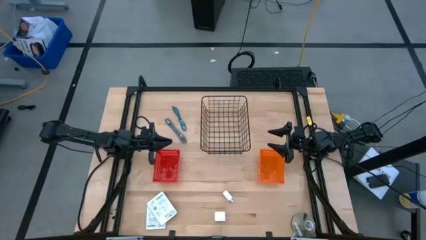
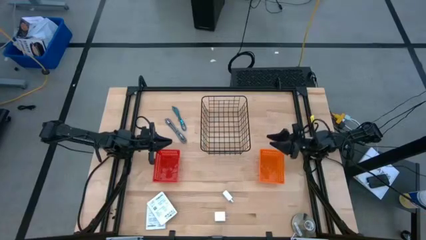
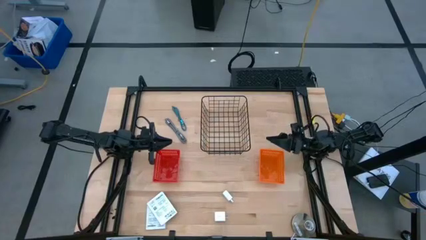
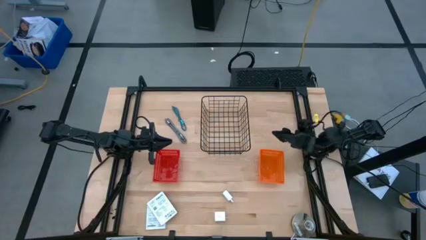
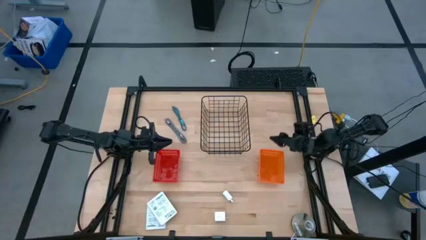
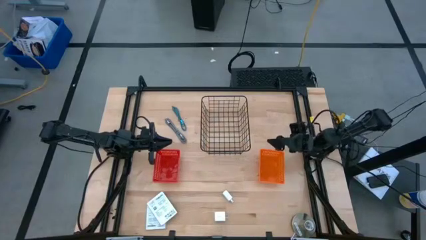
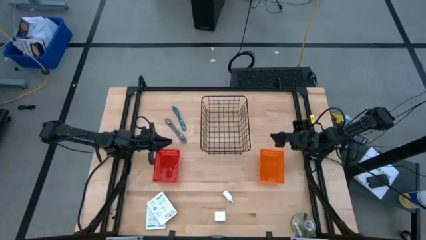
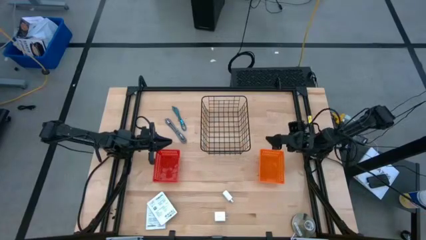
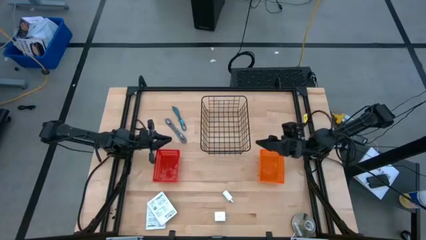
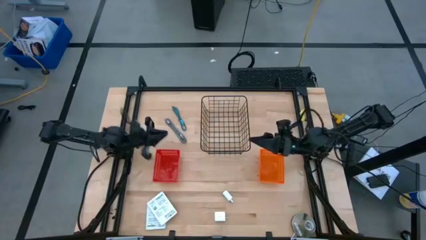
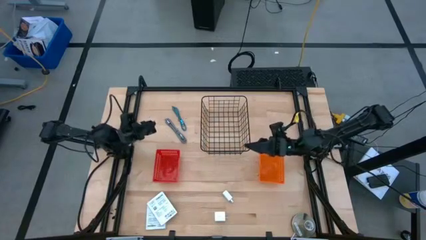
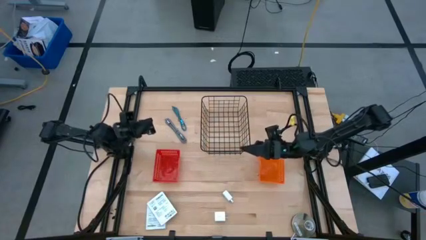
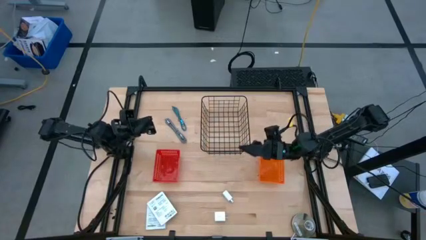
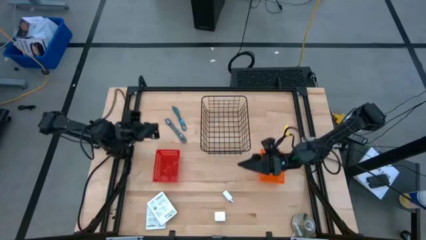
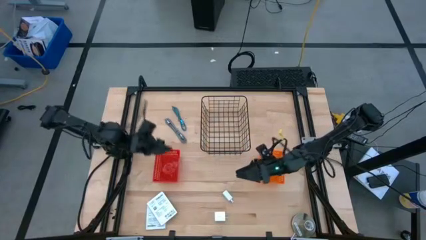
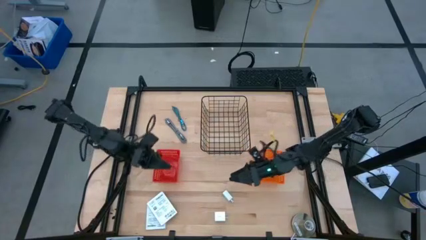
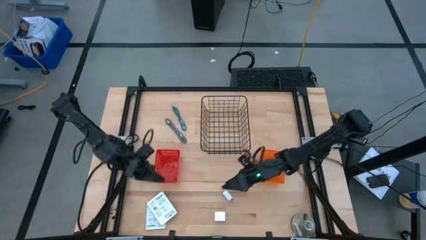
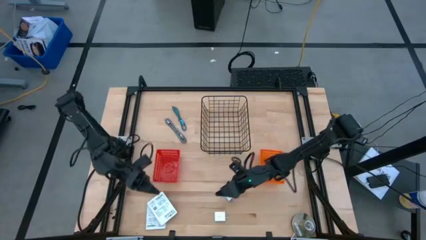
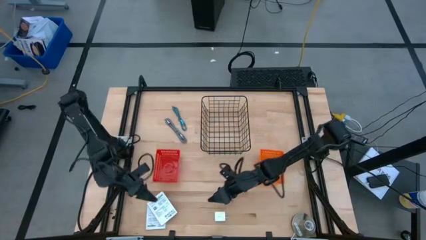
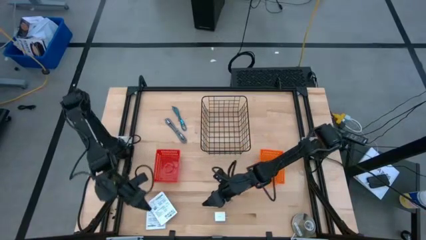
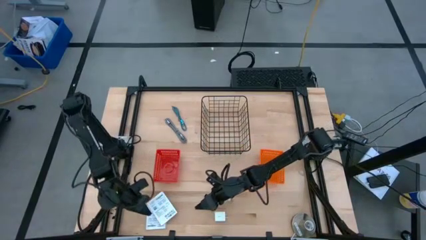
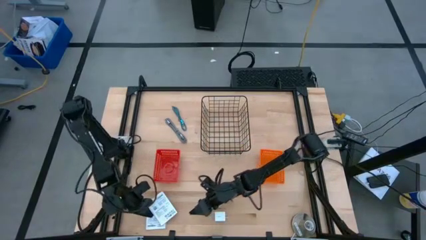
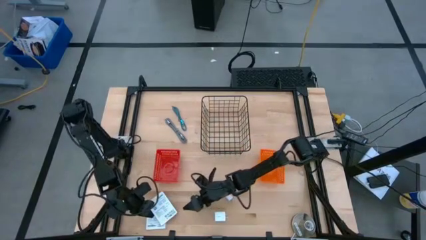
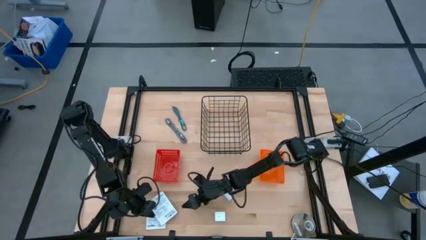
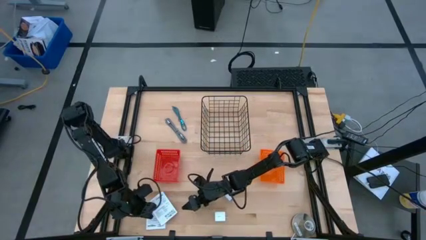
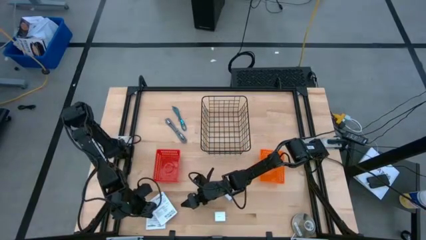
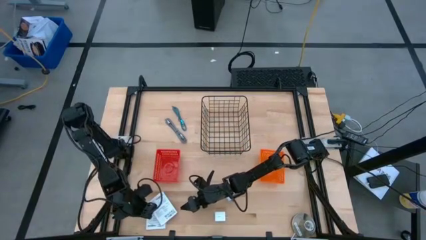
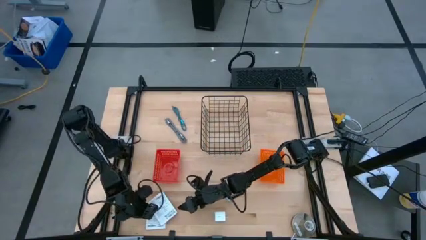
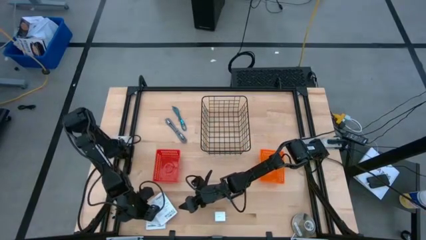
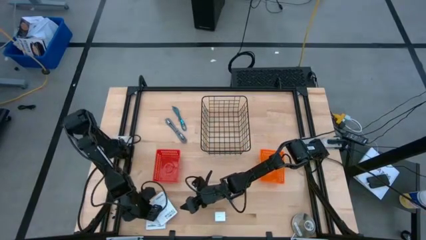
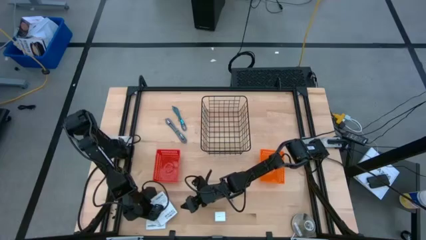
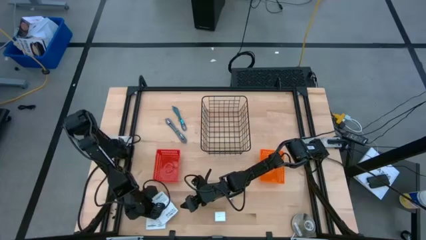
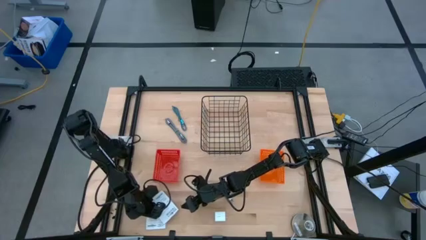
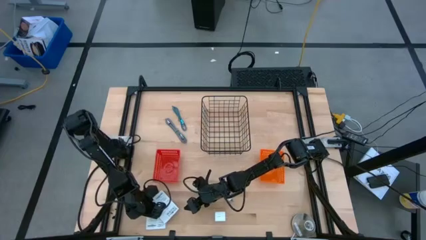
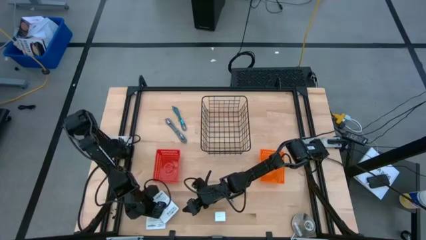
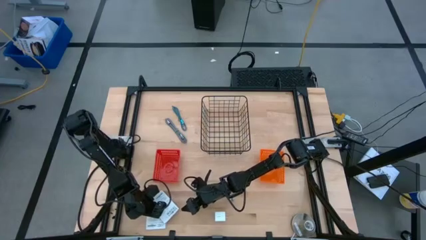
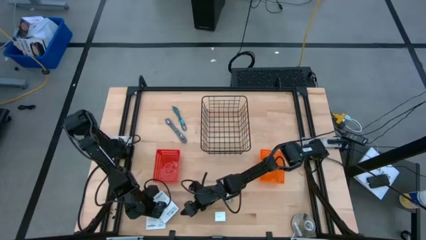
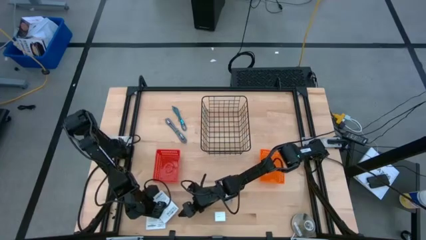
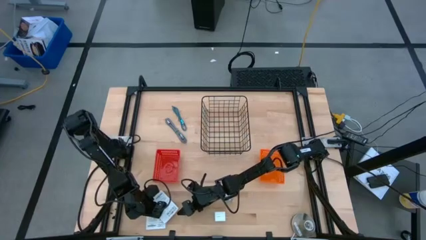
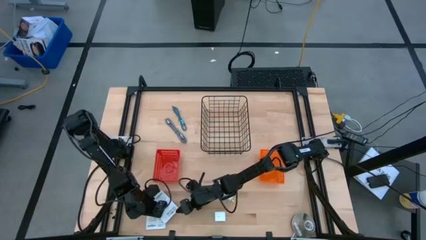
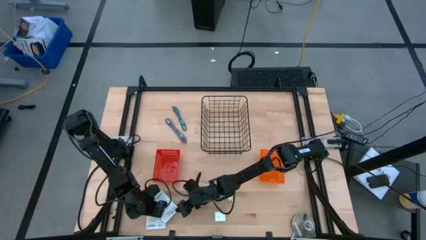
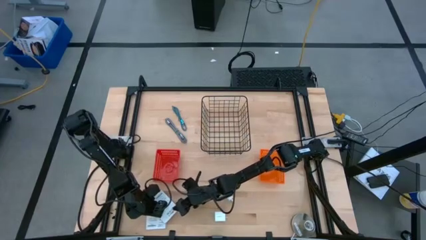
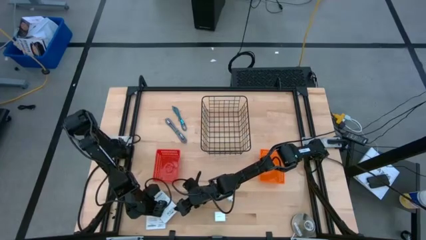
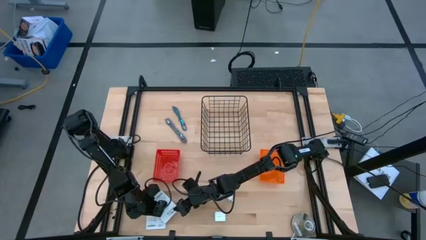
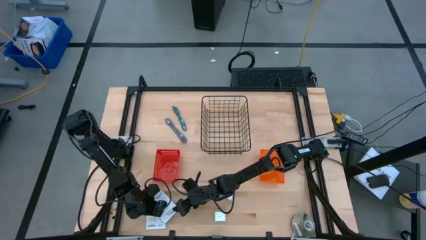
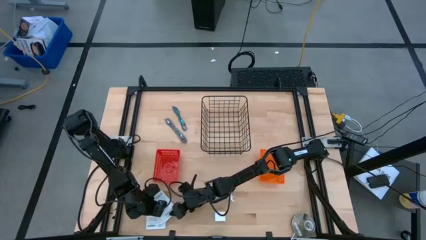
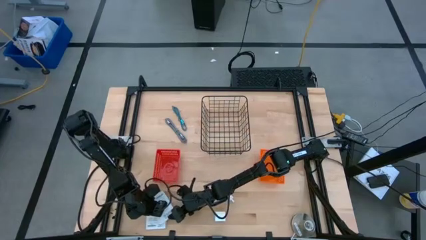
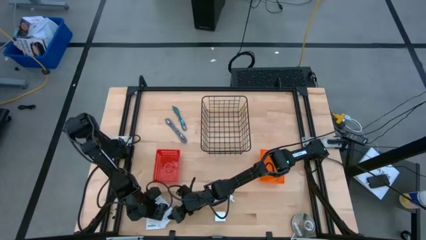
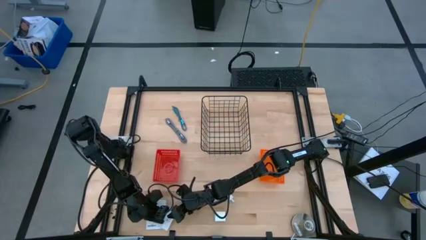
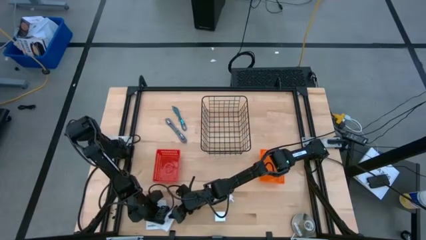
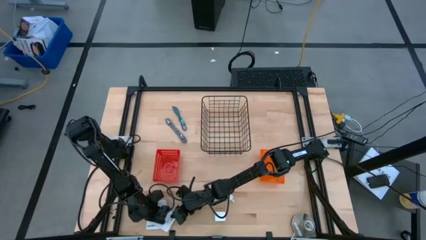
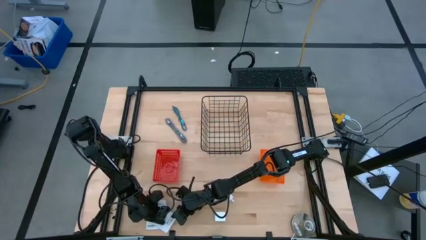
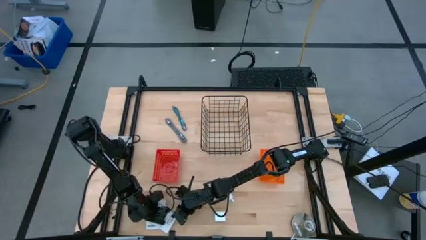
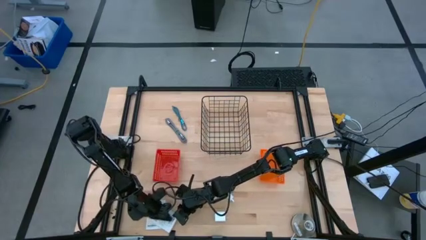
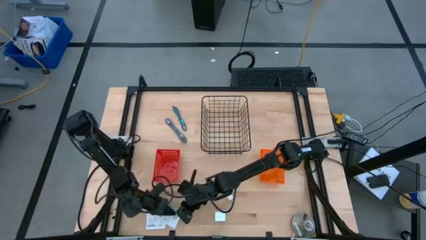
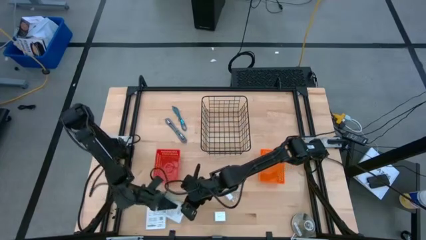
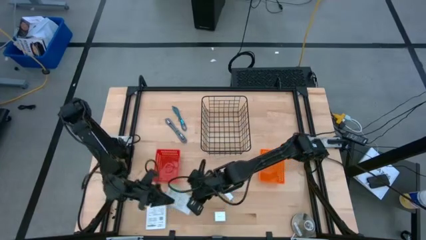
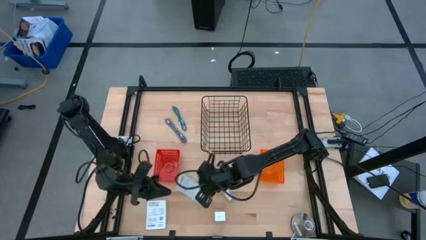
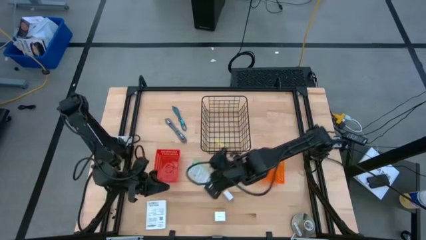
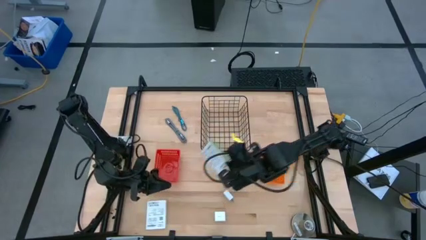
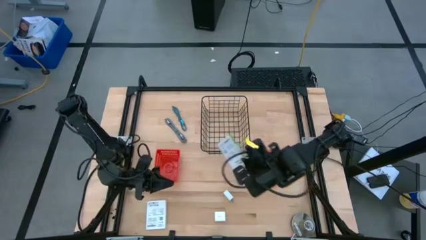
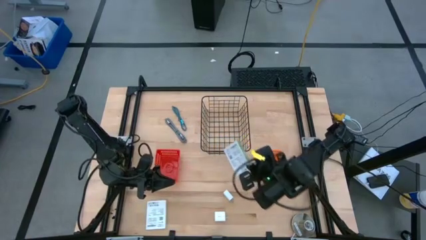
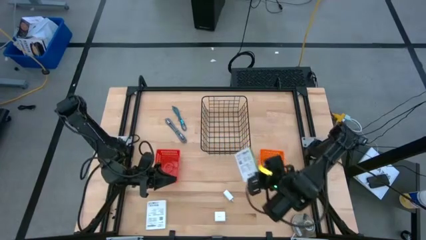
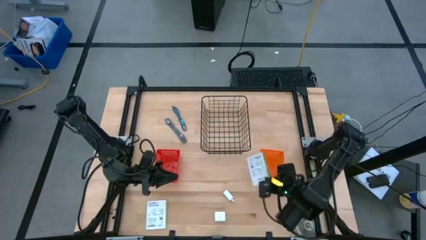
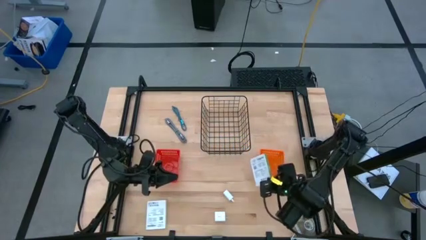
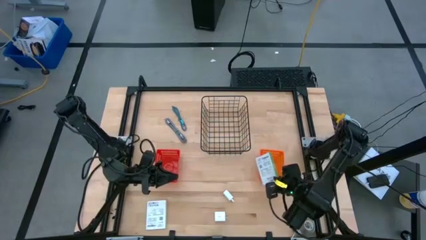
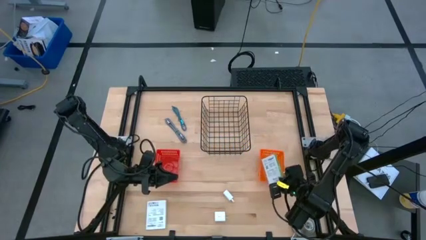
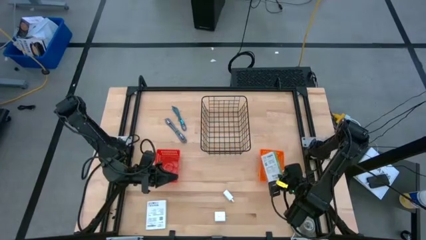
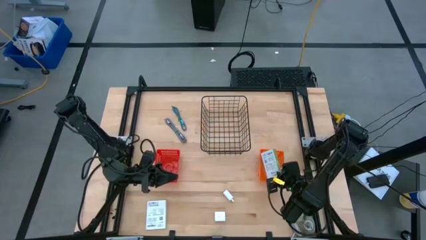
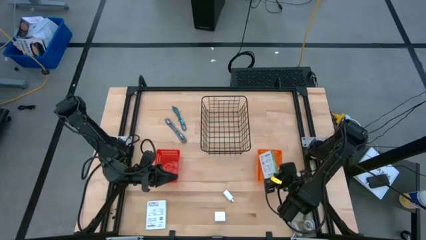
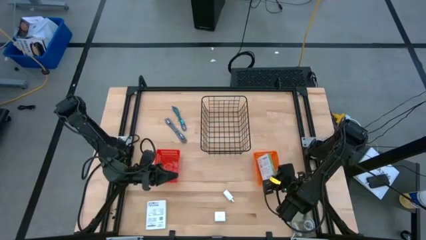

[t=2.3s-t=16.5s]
Task: Pick and place items into bin
Put the white card reader box into the orange bin
